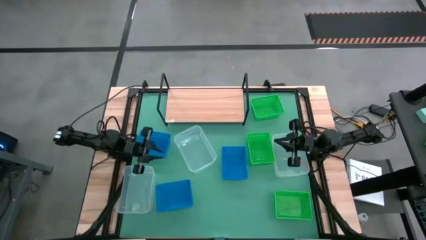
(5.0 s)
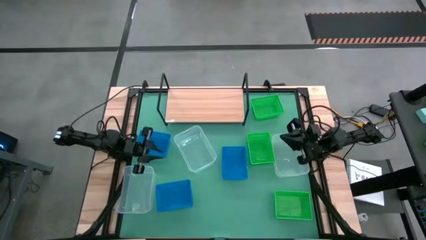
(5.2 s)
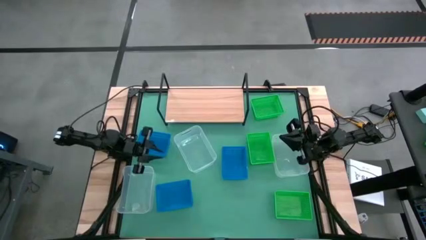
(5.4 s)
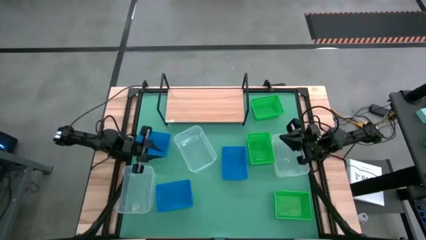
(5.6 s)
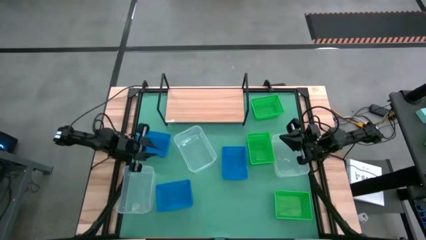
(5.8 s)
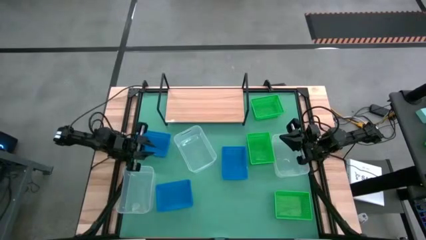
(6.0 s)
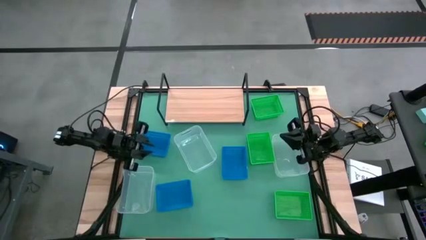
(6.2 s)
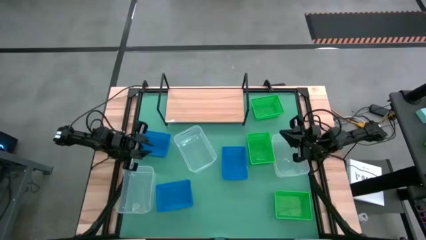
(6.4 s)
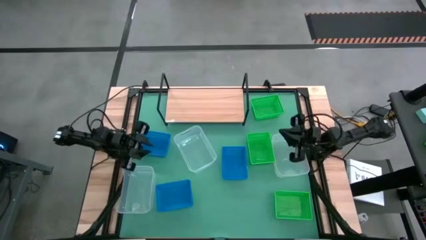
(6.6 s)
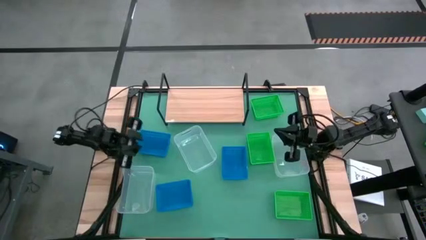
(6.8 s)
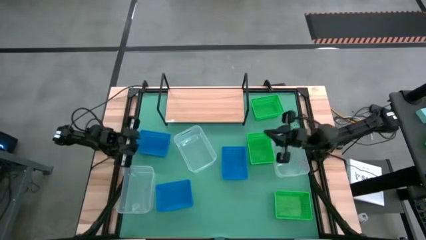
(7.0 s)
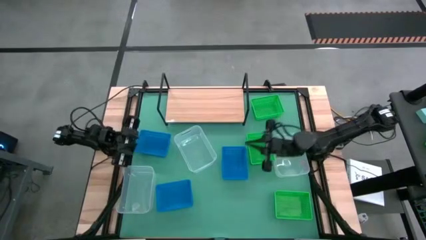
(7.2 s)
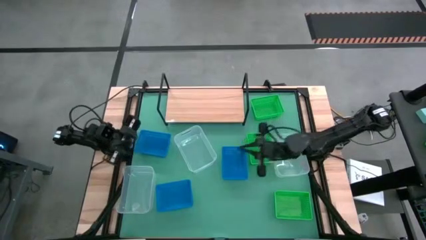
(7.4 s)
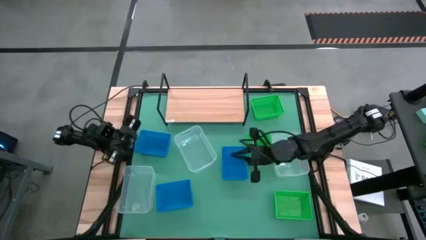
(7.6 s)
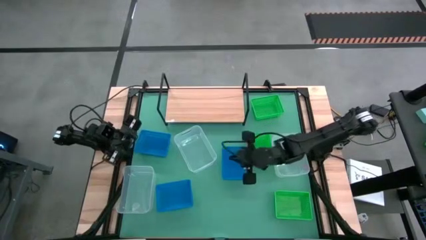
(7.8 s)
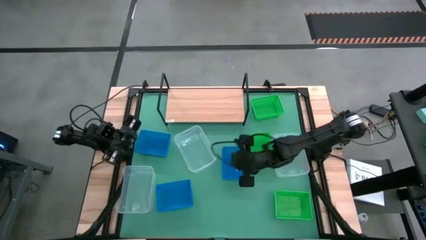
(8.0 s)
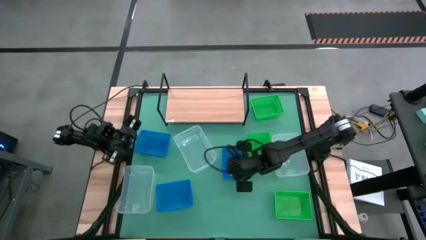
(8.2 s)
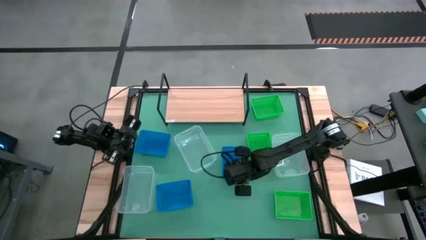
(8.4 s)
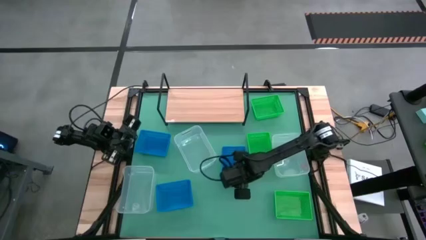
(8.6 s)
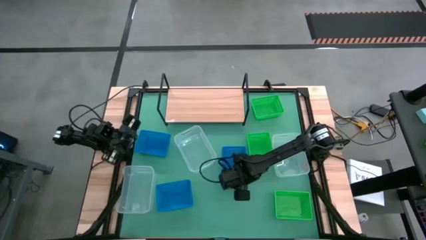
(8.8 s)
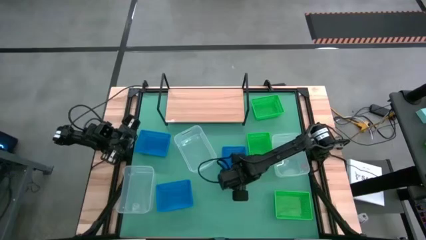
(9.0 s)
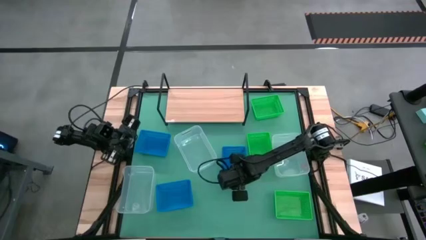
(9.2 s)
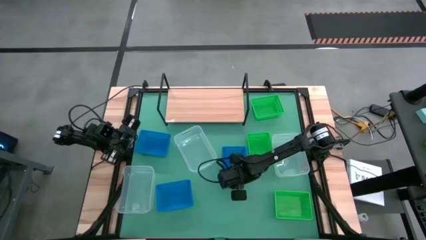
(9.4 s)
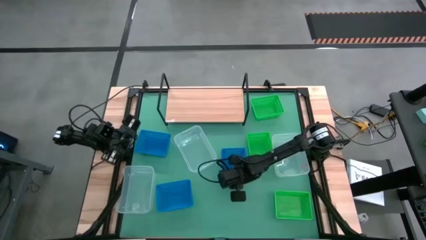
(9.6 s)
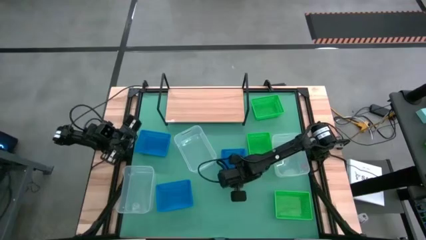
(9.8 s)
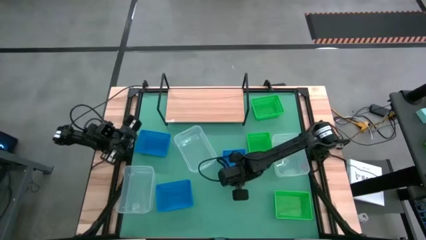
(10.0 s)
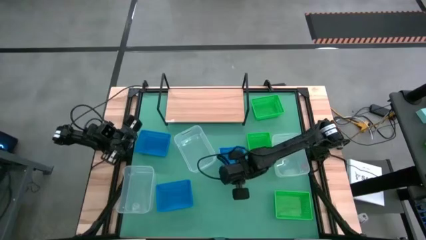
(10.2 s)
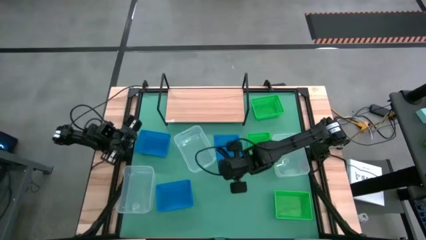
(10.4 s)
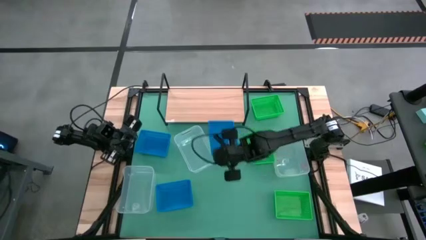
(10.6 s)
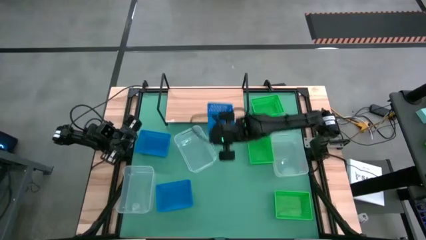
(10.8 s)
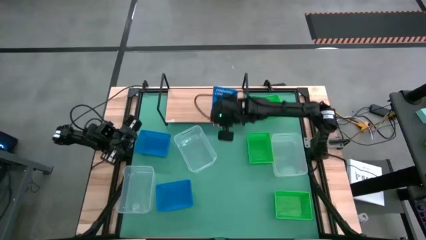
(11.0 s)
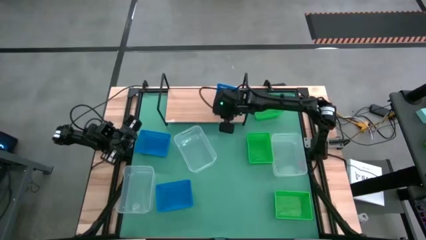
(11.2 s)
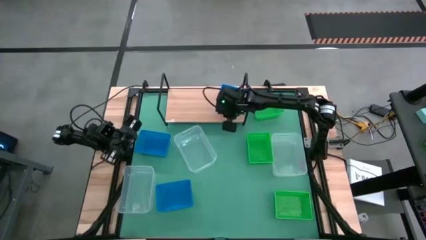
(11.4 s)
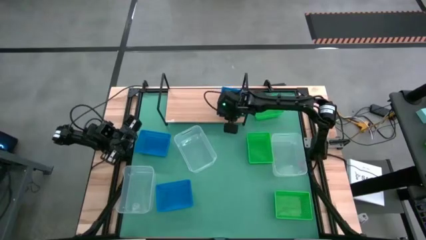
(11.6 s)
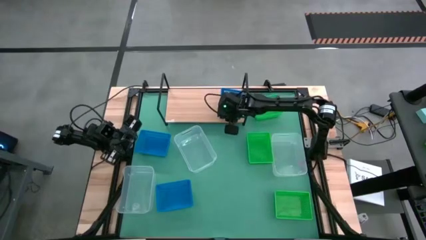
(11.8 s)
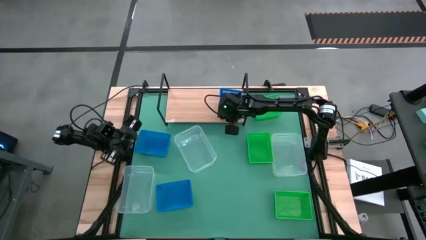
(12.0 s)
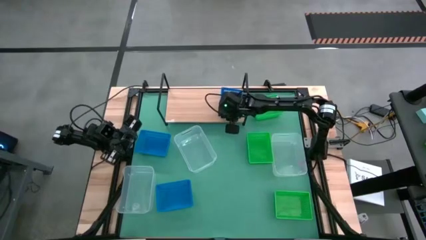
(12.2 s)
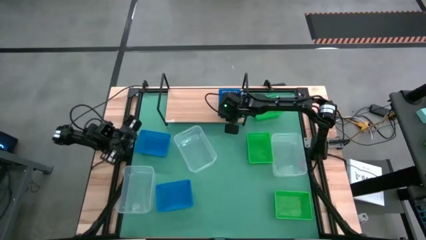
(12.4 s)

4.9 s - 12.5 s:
Task: Stack baskets on shelf by color
Put the right blue bin on the shelf

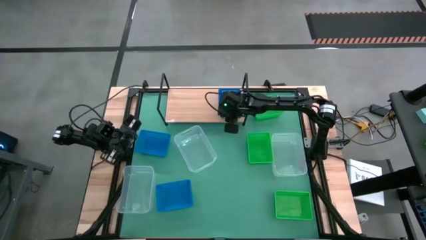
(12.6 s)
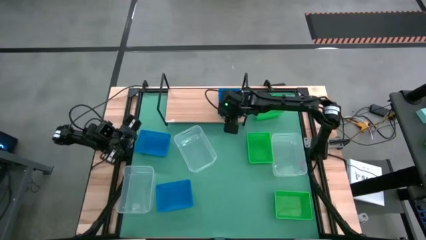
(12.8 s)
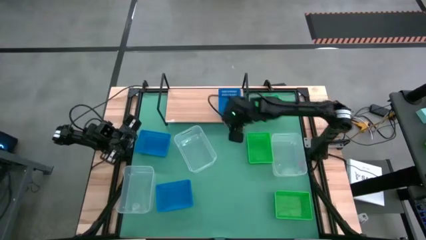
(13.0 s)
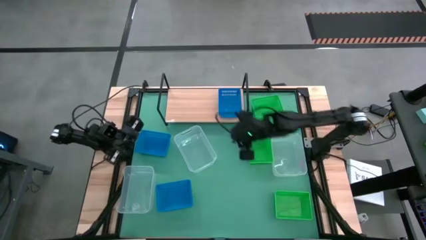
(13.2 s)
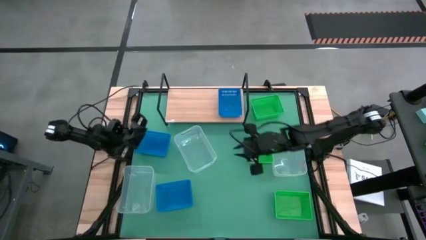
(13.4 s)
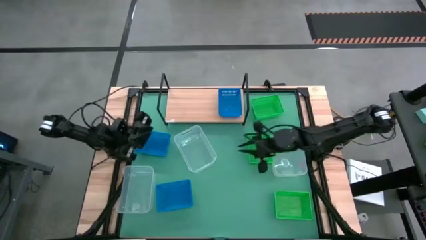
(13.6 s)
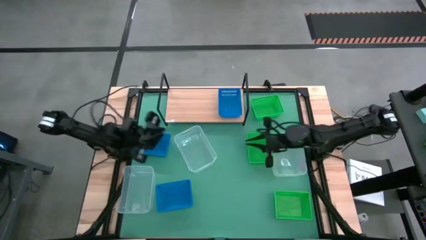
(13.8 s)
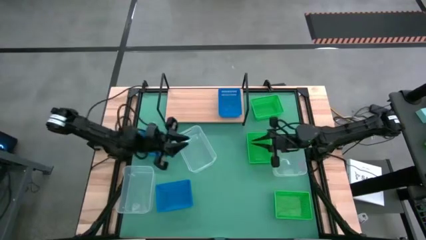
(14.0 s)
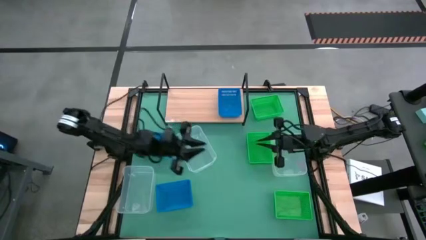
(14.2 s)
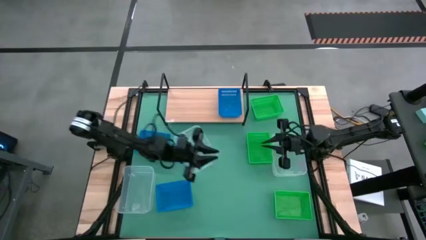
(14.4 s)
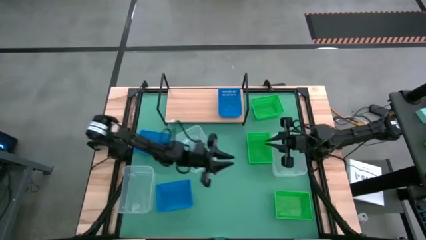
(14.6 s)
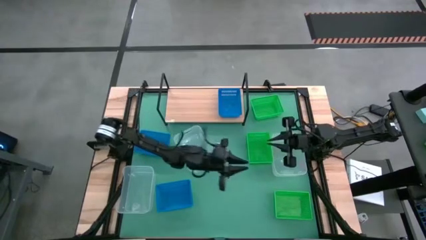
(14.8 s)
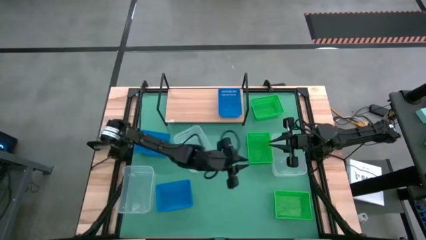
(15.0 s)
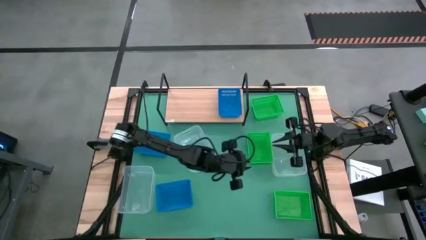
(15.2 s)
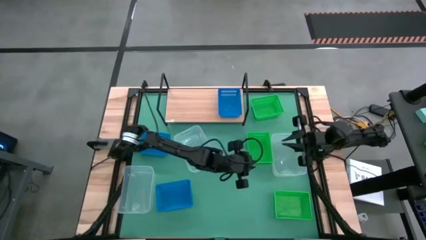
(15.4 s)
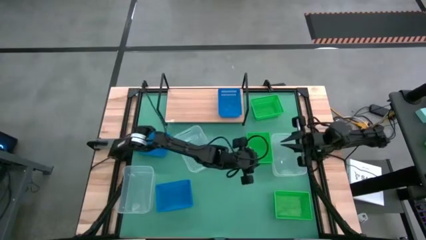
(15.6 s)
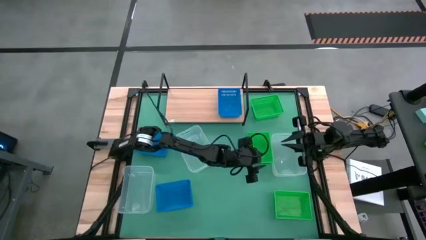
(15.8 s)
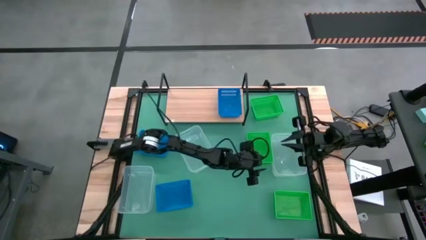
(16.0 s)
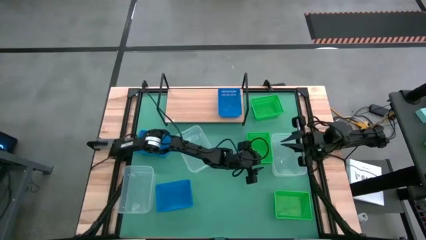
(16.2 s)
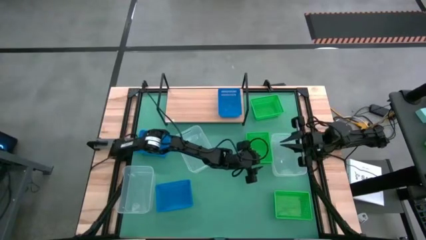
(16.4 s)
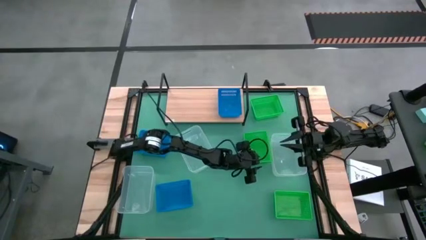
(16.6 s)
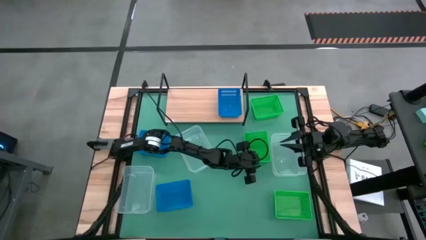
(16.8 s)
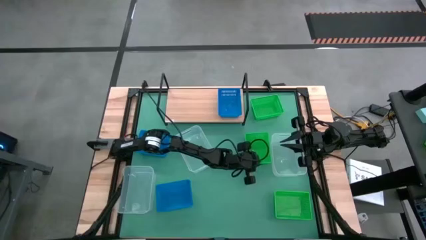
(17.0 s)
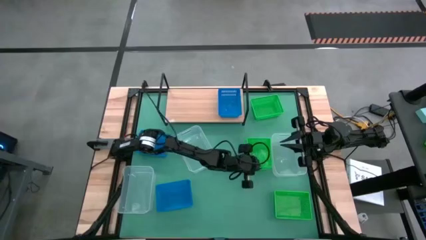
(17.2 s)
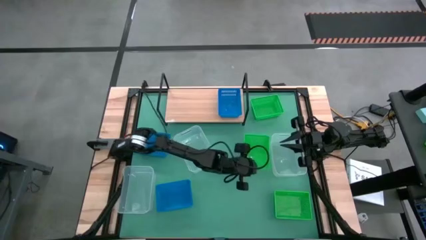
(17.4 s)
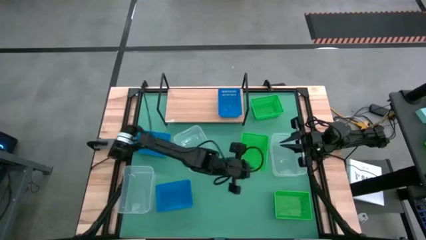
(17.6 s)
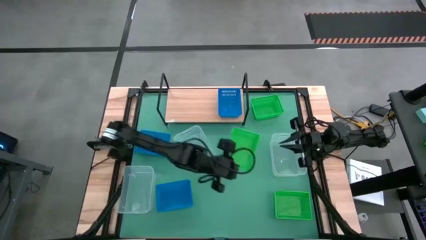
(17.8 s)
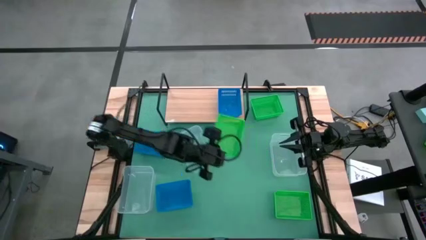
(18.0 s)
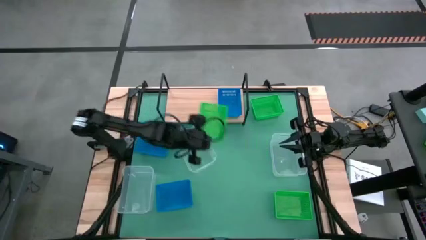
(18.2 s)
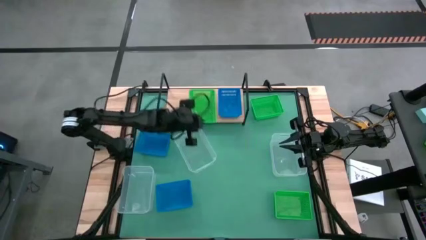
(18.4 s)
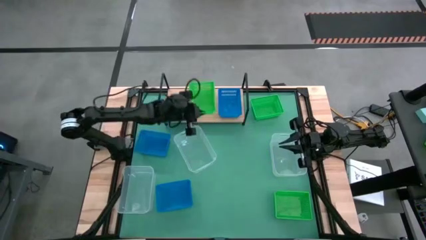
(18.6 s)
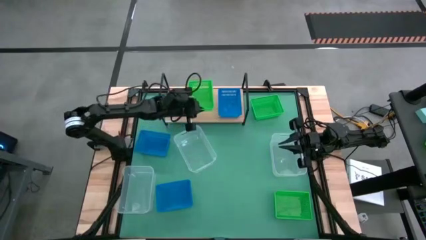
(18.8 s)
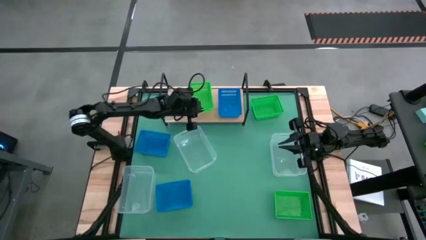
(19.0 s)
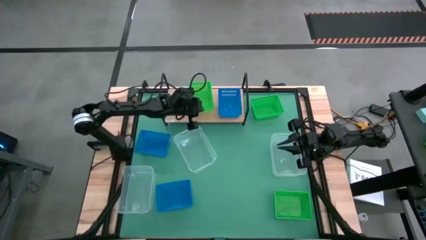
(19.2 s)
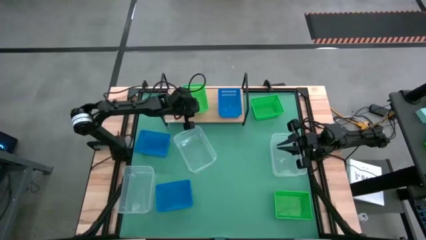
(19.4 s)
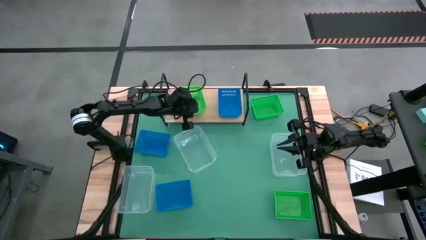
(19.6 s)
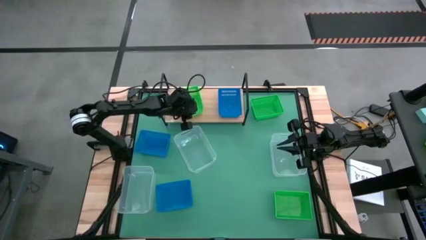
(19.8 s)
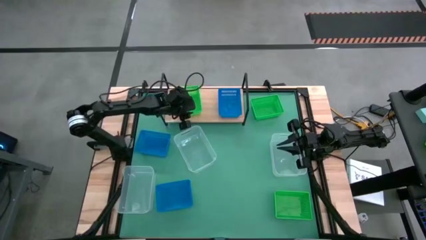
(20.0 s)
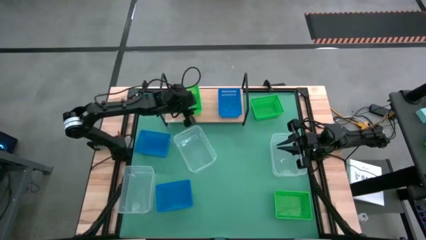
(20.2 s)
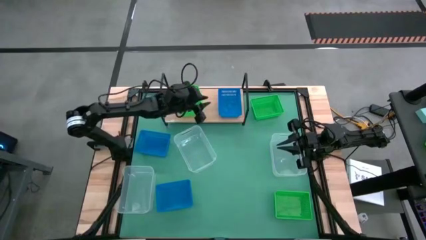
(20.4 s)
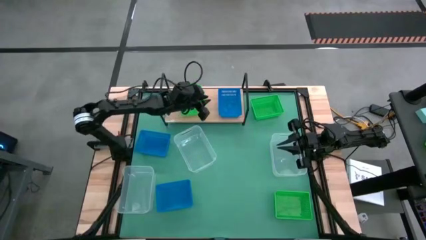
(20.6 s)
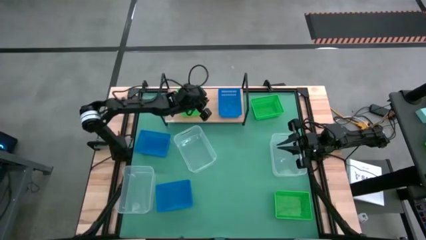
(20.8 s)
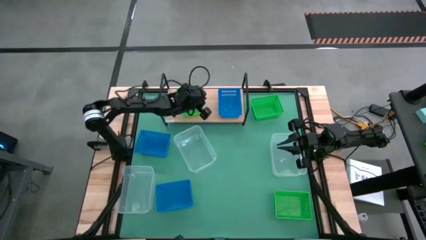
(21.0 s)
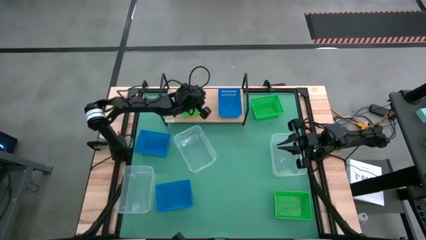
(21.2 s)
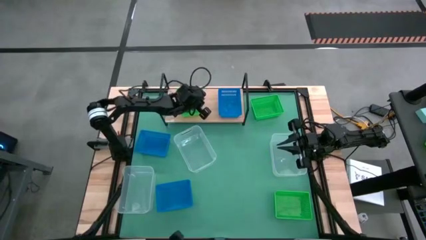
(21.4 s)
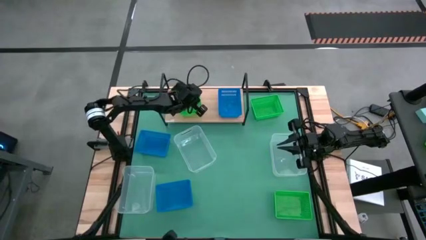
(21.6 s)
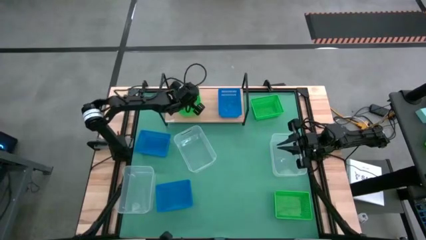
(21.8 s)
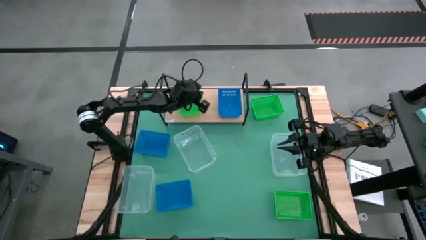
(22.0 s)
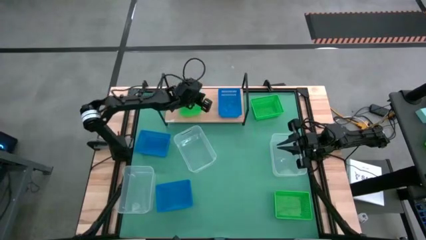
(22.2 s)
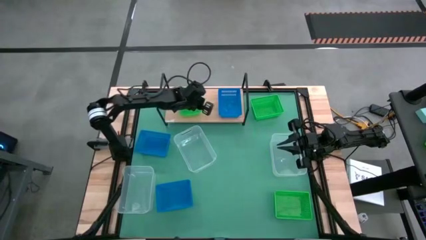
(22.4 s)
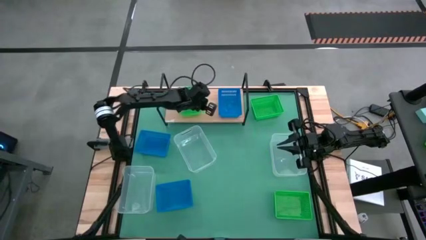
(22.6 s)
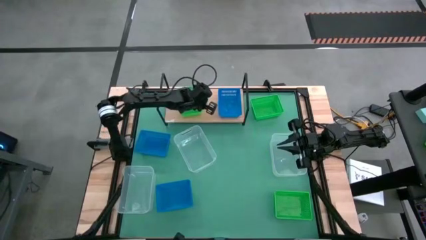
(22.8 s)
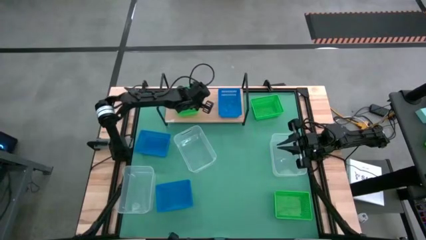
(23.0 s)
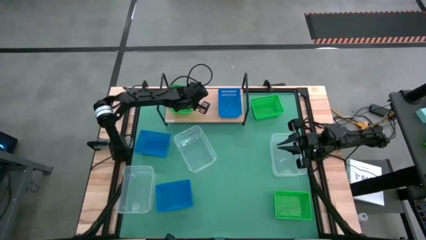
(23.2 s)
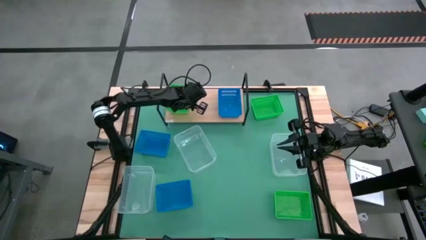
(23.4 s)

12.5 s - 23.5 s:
Put the right green bin on the shelf
